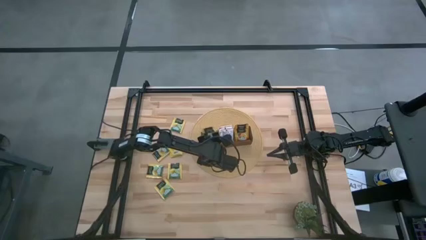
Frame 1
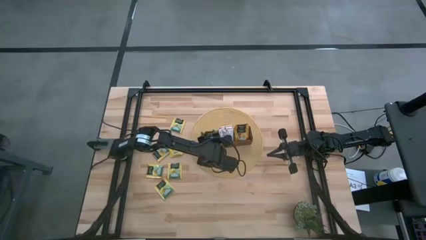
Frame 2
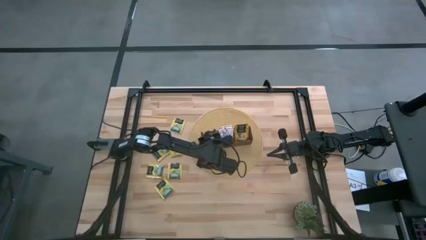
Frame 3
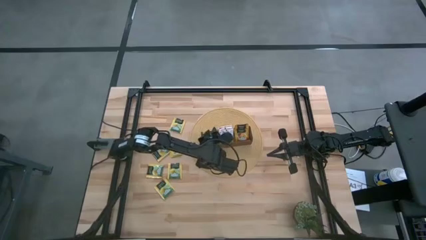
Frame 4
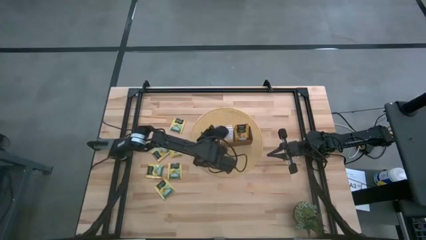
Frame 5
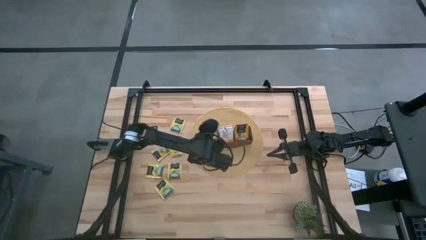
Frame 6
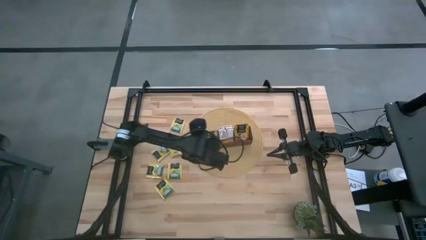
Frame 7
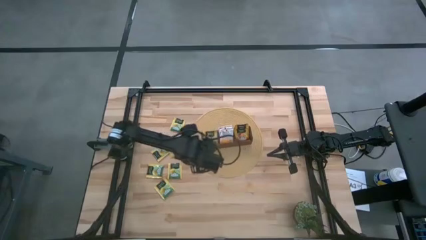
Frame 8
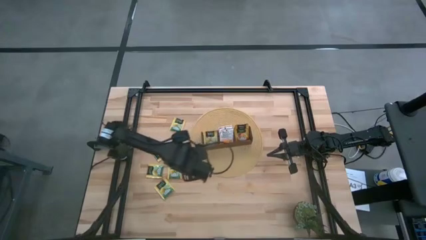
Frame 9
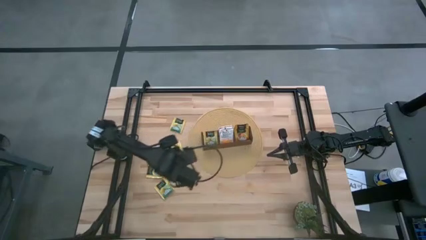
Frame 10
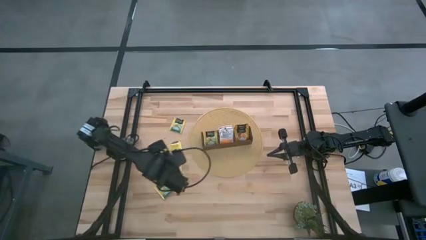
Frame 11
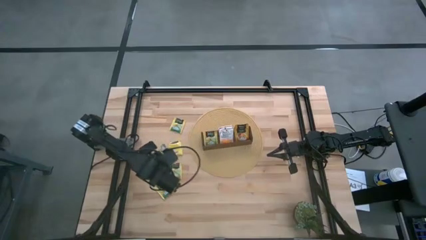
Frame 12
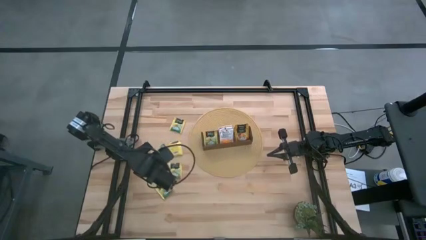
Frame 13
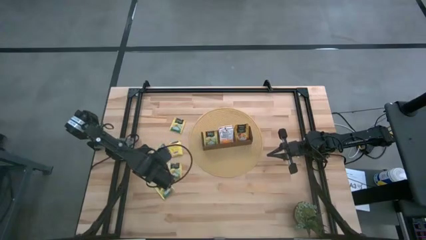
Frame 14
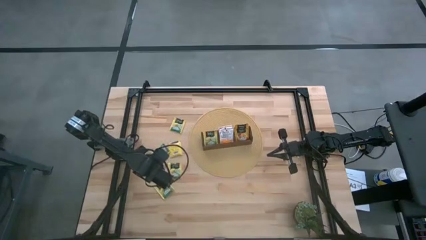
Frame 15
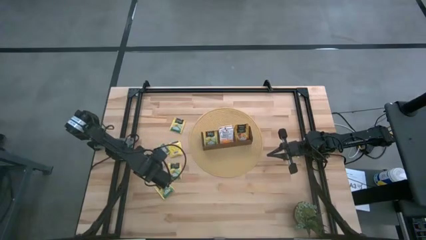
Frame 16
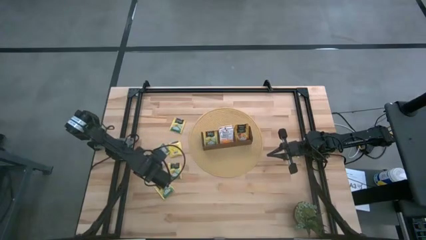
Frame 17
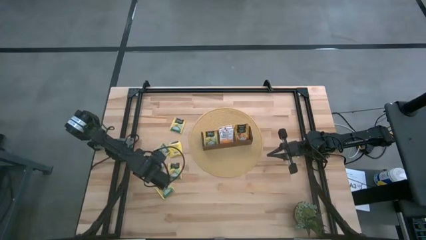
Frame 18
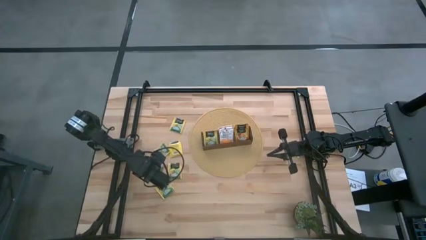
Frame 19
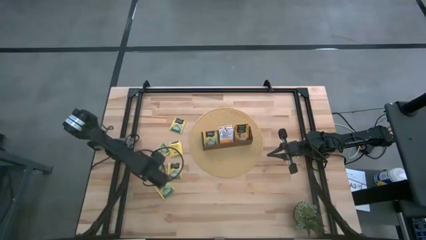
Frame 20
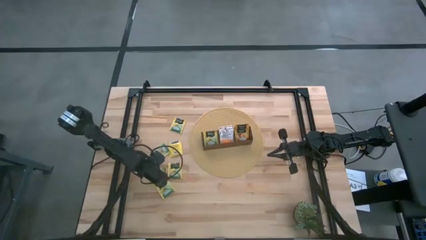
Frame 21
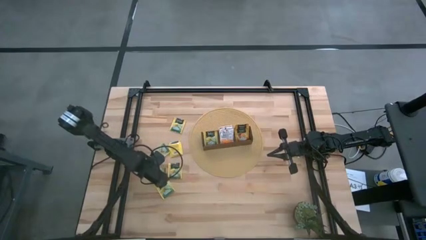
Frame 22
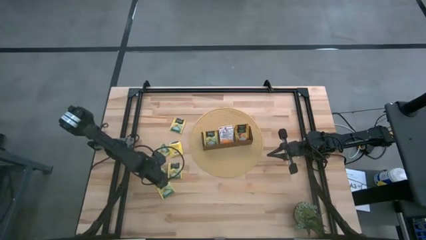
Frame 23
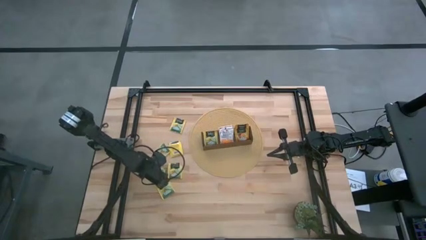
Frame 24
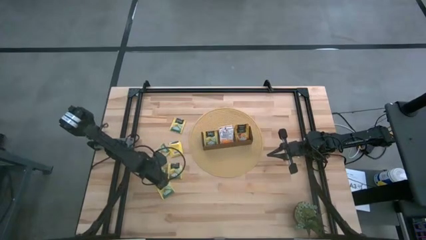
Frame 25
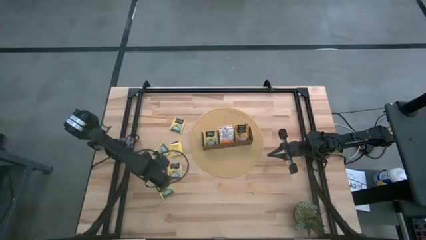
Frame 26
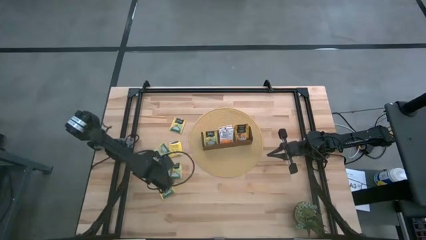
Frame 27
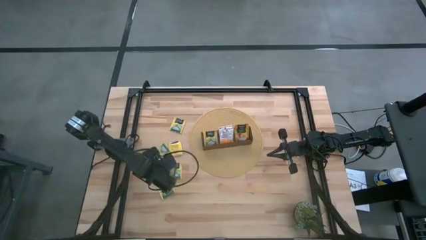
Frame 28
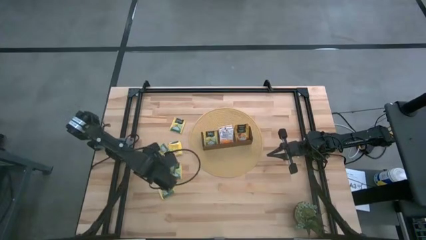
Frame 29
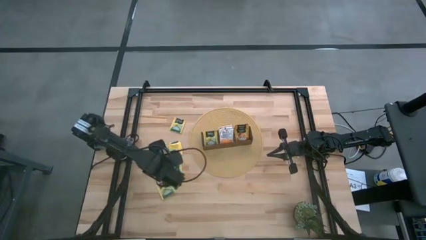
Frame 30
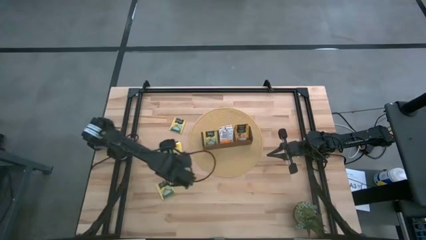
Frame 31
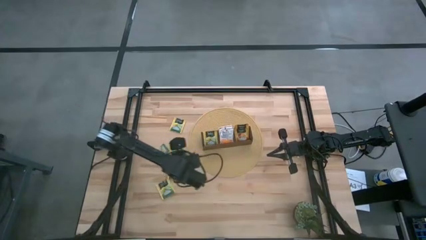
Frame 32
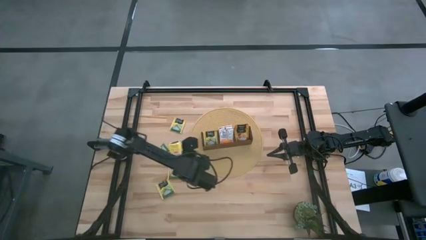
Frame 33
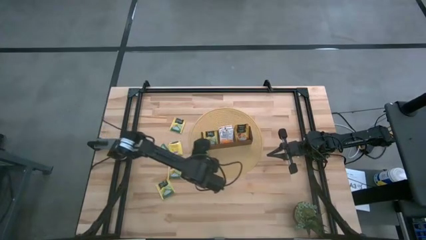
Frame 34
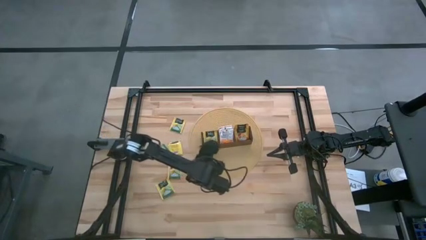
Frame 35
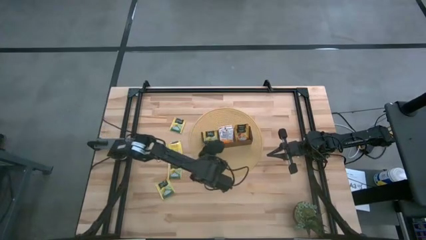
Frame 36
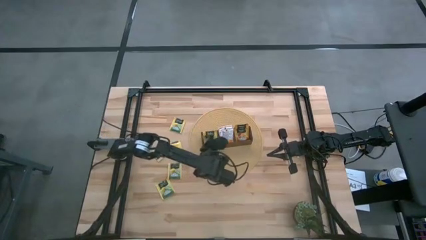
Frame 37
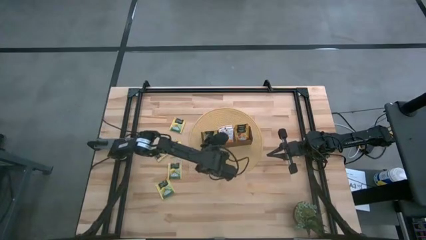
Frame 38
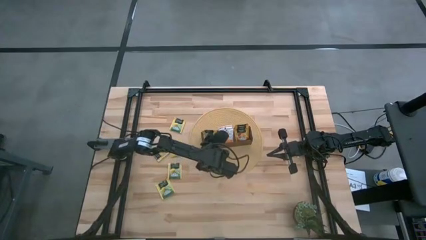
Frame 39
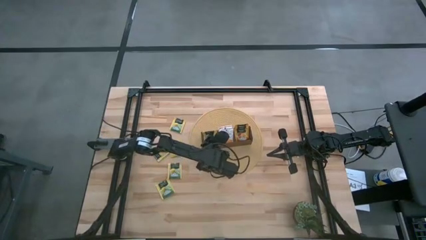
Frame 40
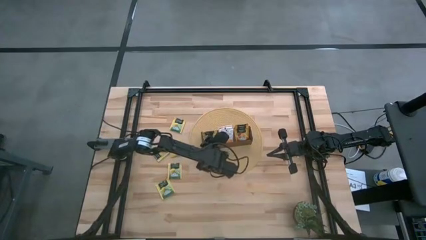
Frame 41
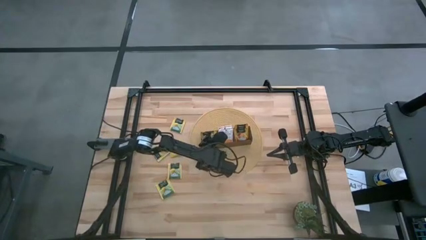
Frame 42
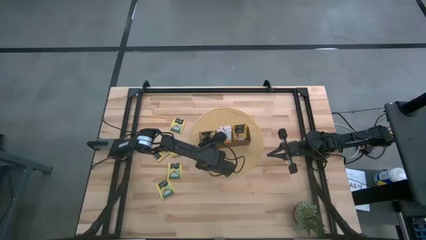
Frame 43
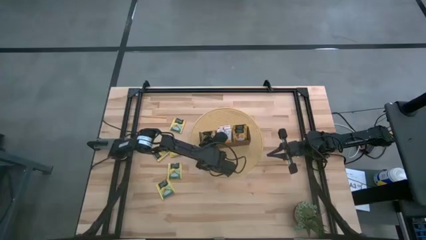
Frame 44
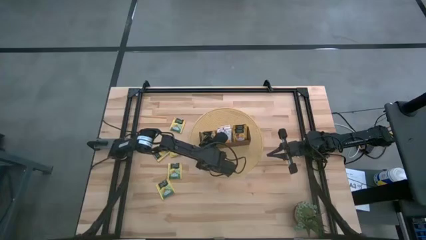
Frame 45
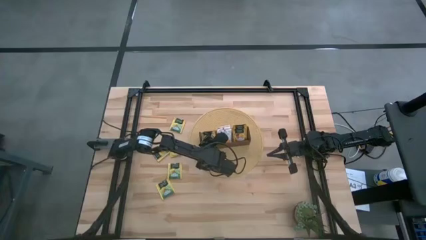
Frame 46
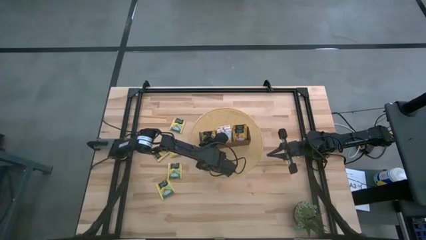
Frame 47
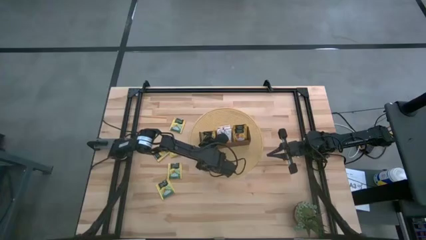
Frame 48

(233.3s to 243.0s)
Task: Pick & Place Tea
Put the yellow tea bag into the left section of the wooden organizer

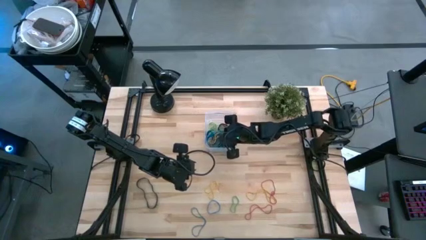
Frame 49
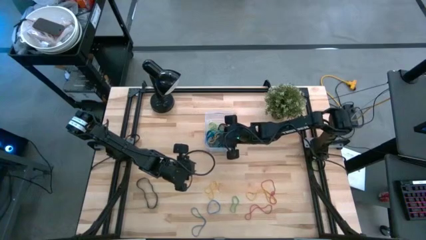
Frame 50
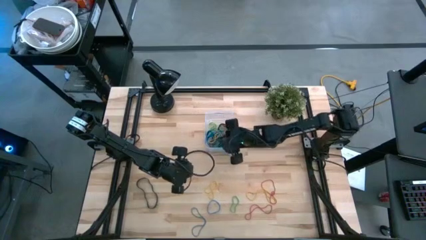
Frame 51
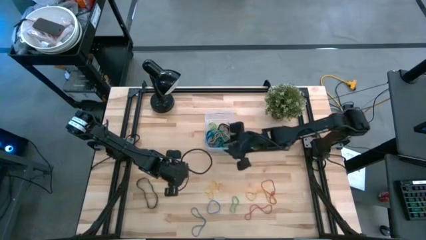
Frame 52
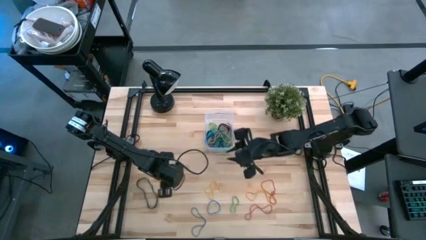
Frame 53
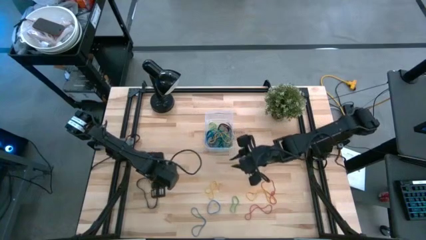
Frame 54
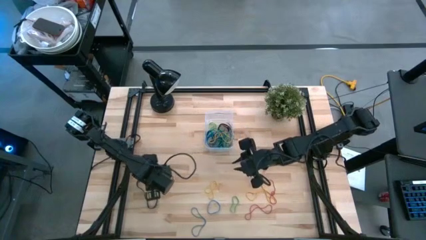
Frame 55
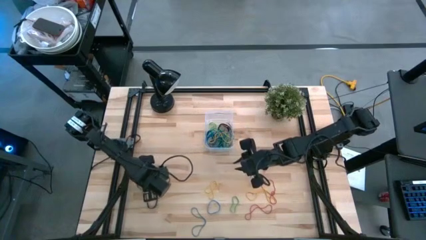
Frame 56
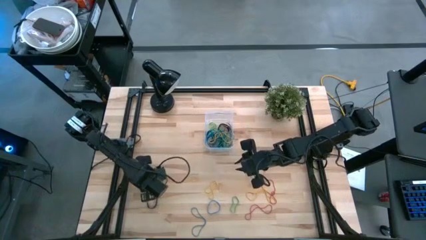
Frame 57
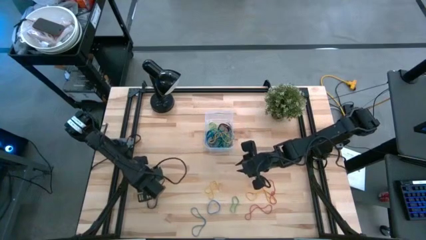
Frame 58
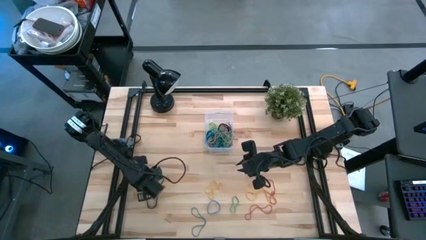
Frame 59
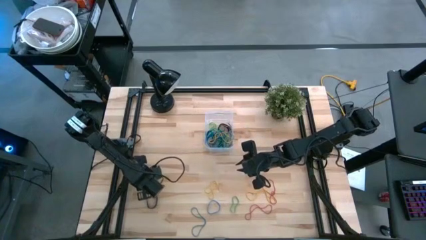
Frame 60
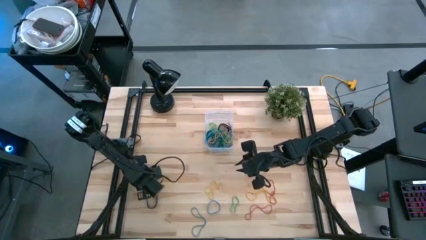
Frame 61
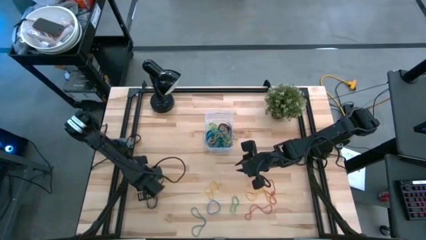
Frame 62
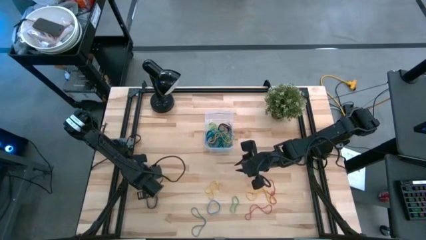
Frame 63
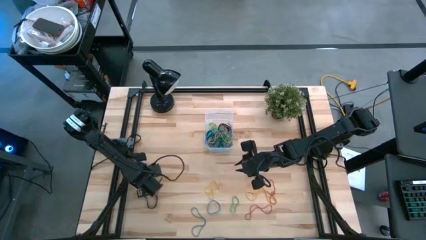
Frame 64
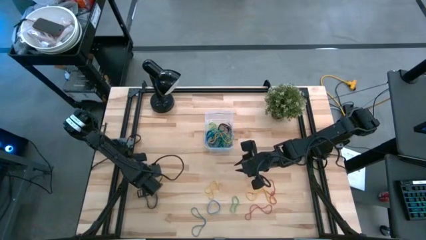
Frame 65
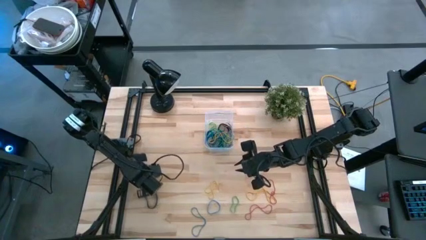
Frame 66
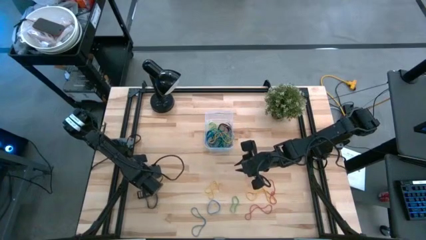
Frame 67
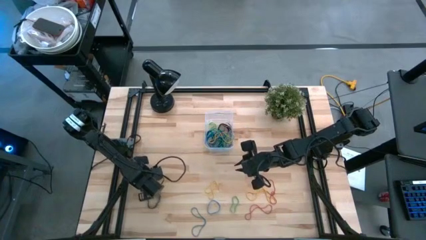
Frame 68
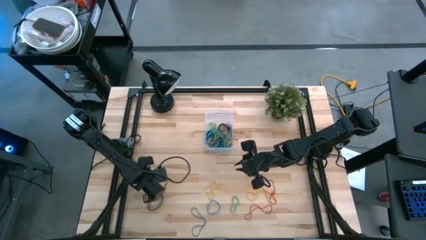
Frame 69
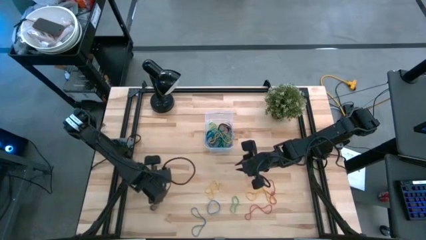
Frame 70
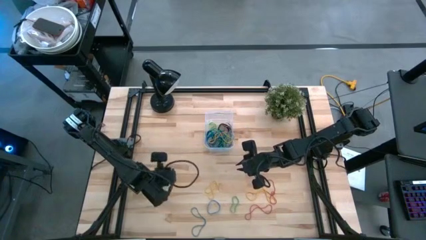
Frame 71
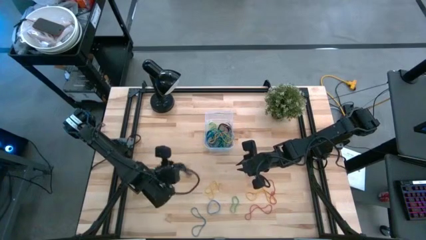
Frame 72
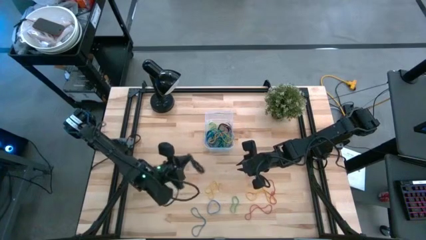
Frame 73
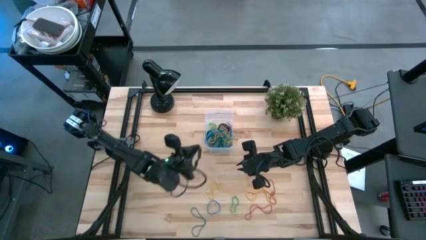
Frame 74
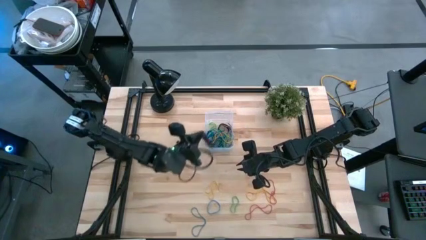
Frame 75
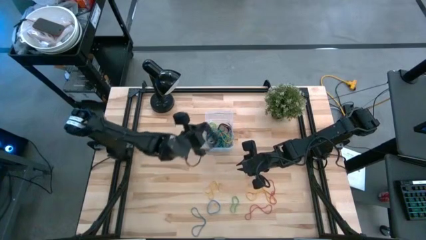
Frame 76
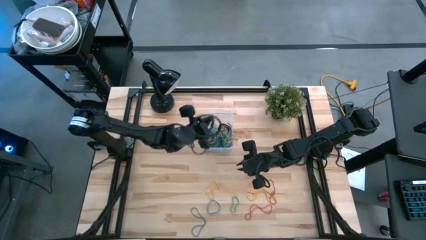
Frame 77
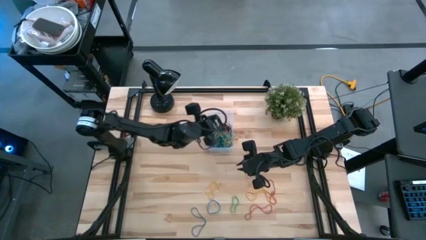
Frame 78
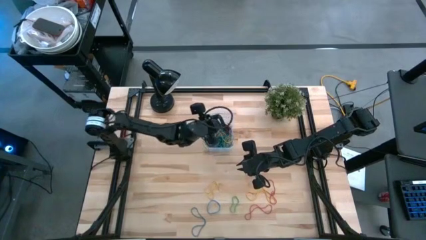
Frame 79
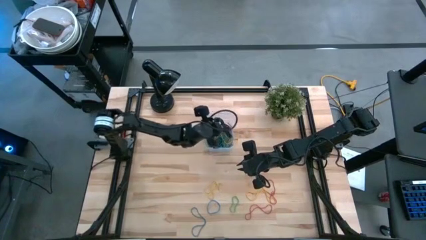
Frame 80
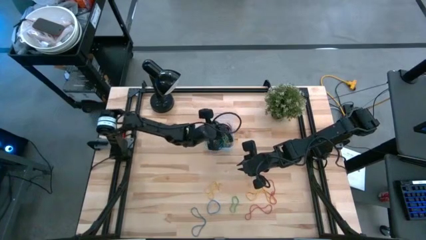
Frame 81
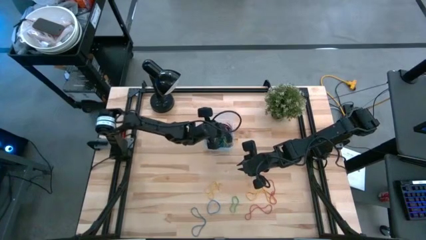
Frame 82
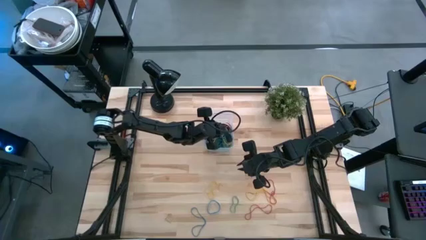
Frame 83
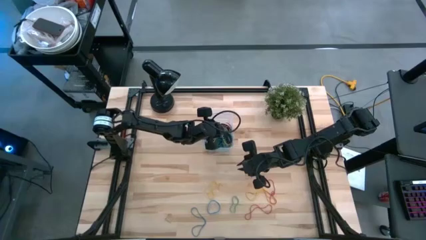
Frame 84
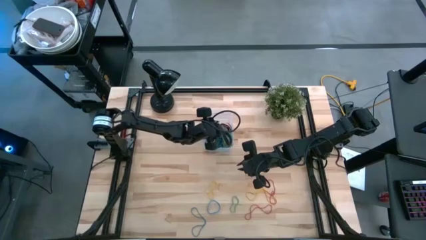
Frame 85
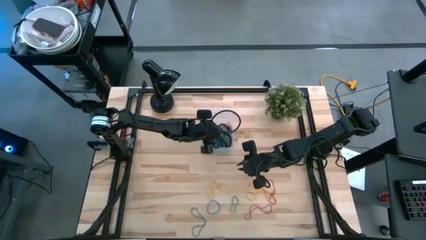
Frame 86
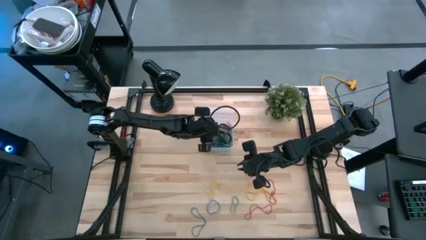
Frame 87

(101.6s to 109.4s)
Task: Pick and place rubber bands into bin
Put black rubberband into the transparent bin
